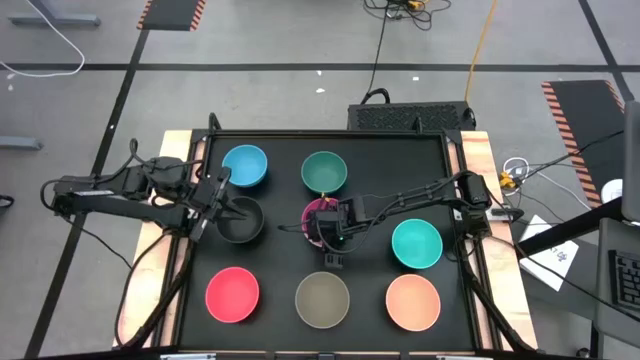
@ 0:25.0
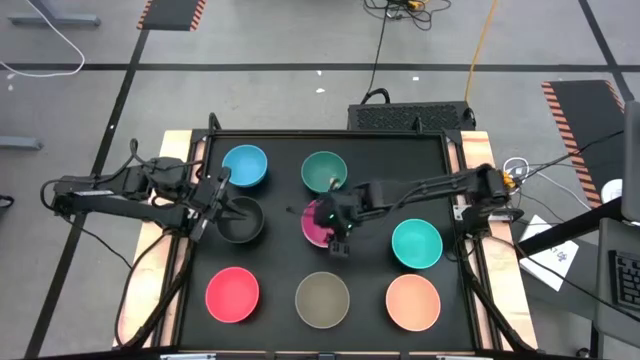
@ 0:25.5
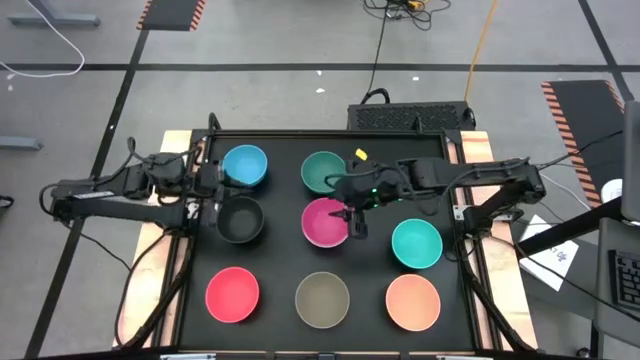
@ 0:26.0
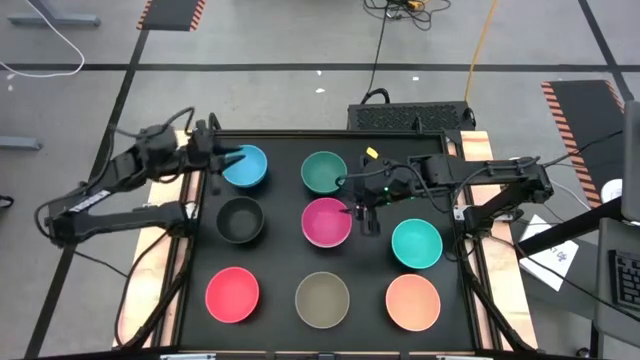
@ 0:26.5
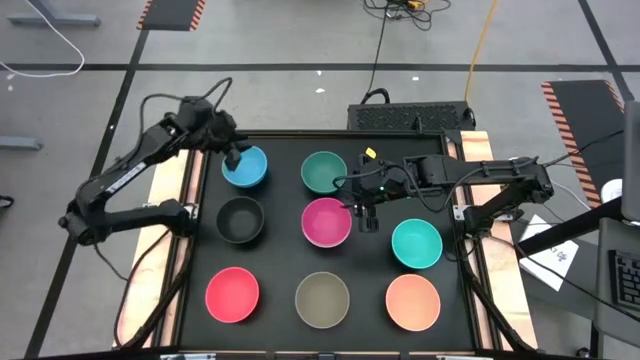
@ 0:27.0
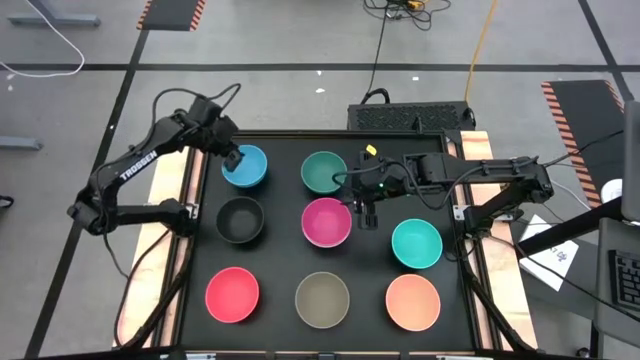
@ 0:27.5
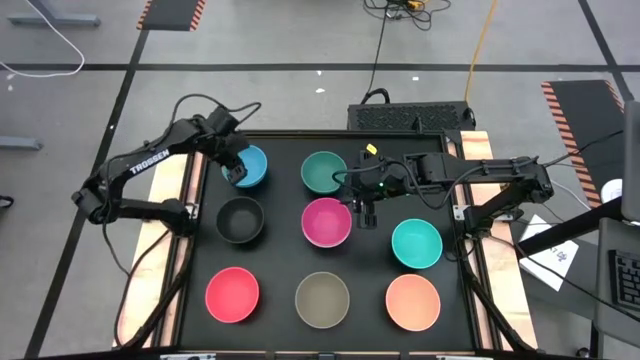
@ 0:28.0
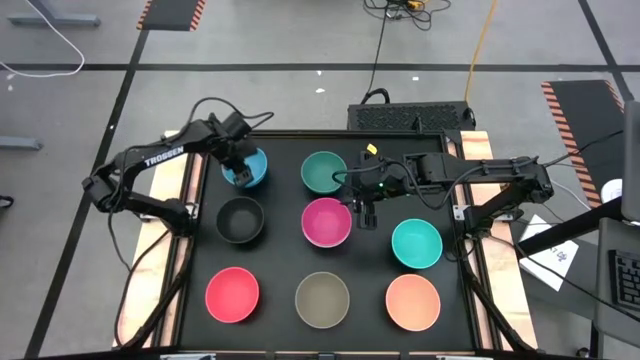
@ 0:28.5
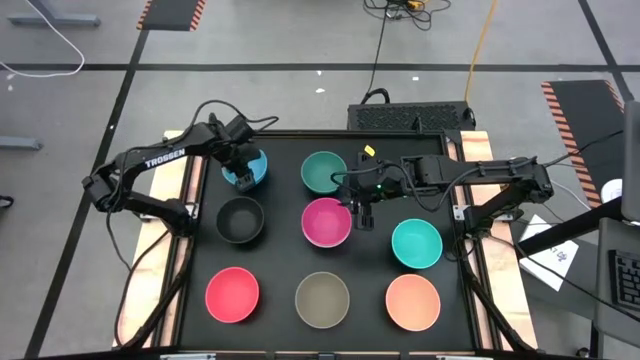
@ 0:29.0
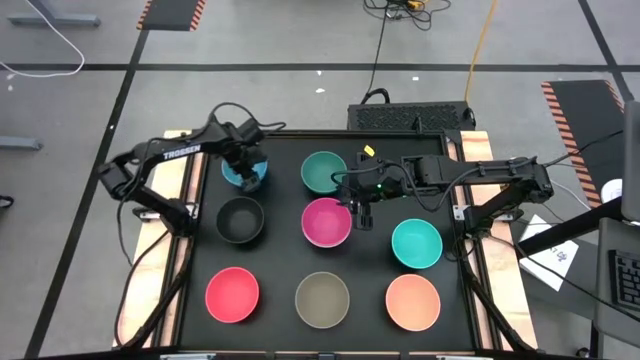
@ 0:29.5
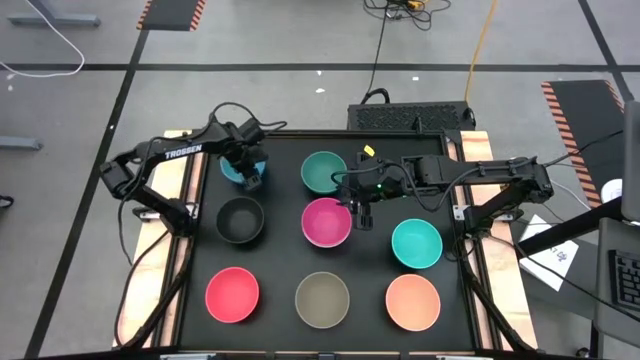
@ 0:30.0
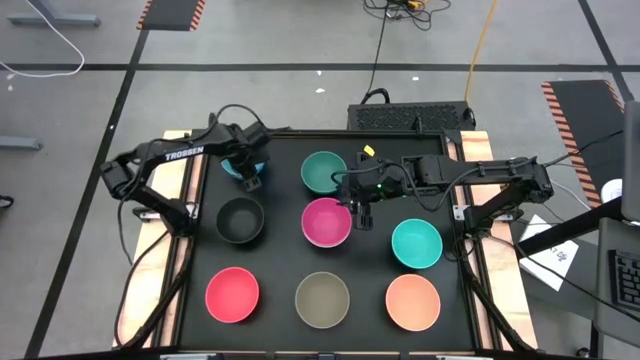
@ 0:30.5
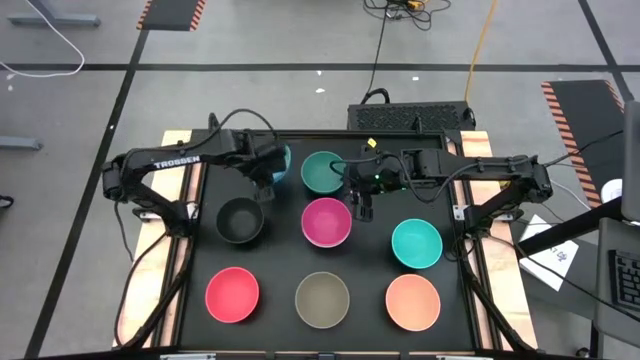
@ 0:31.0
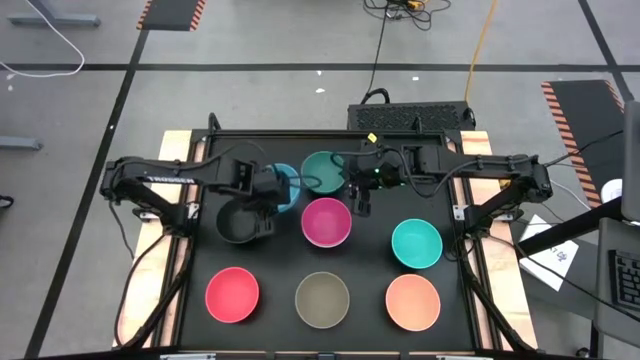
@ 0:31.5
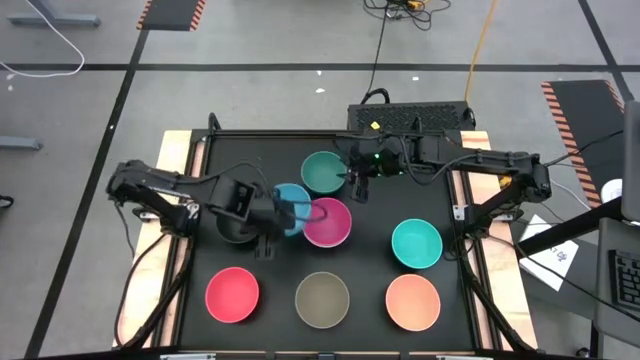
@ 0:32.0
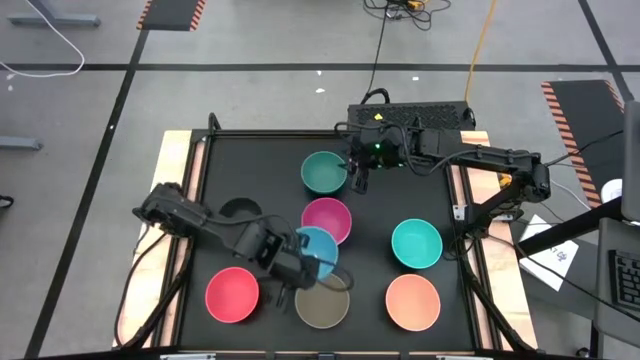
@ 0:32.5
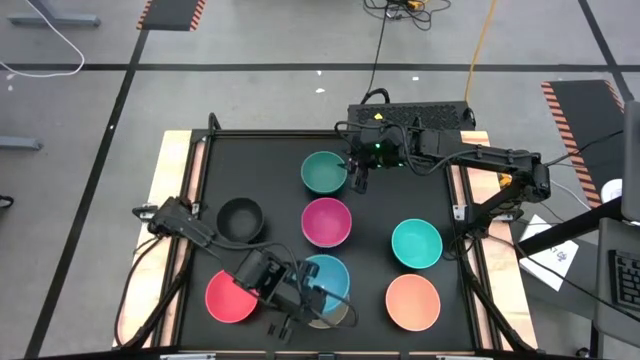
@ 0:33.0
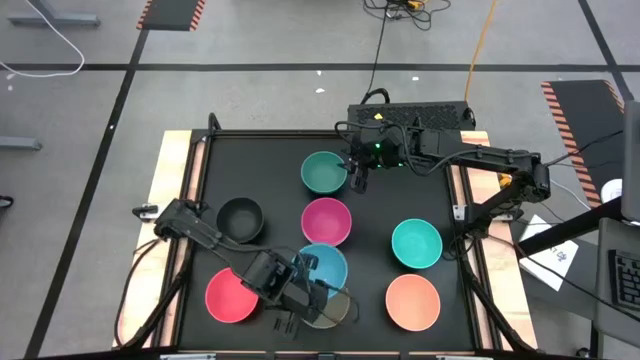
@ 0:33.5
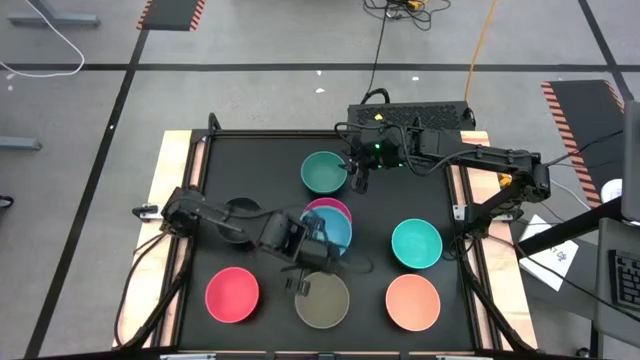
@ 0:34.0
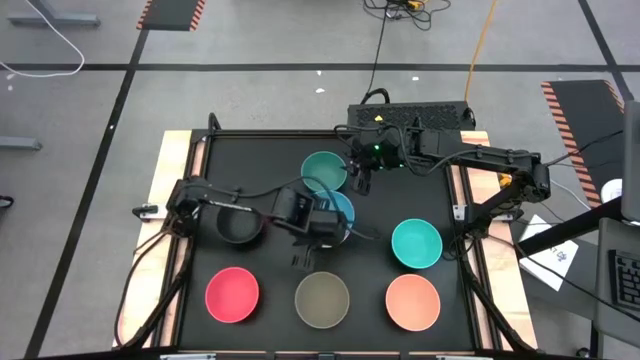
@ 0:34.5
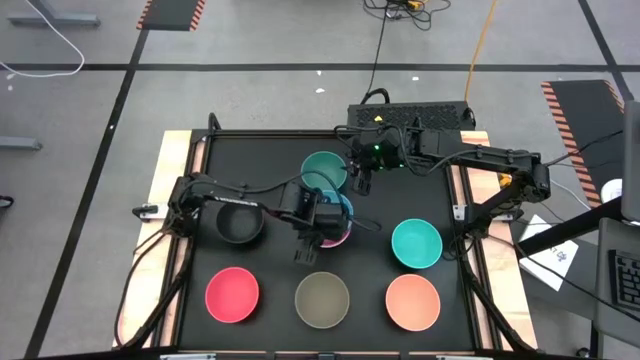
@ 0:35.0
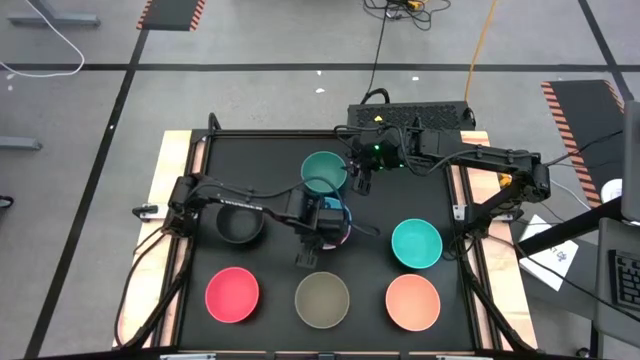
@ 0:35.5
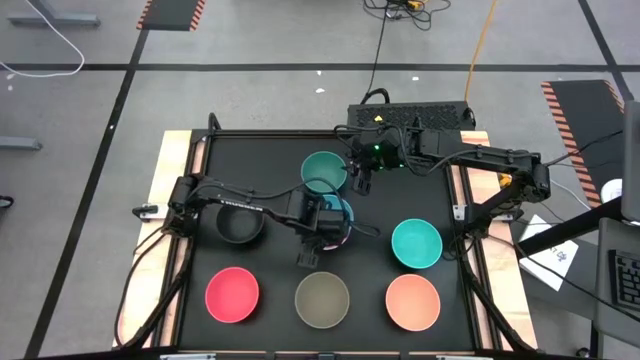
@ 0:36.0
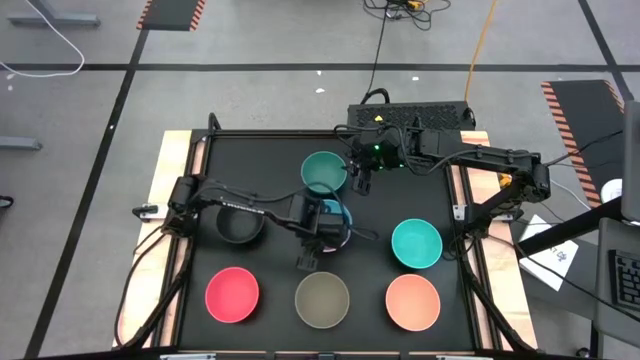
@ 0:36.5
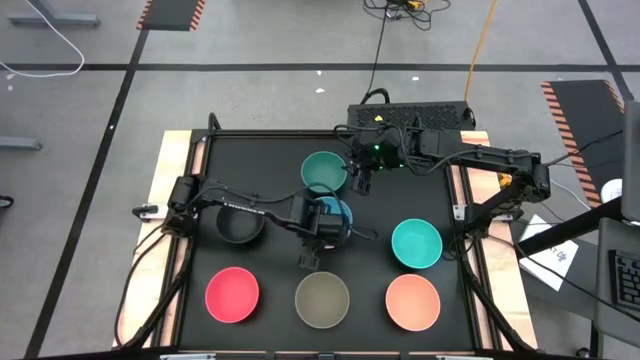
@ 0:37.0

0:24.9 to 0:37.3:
Task: Nest bowls inside each other
Stack the light blue bowl on top of the pink bowl

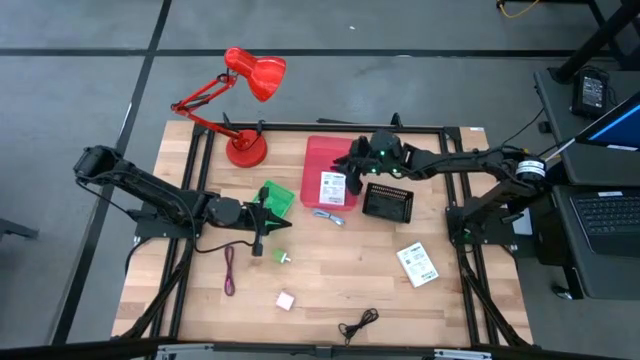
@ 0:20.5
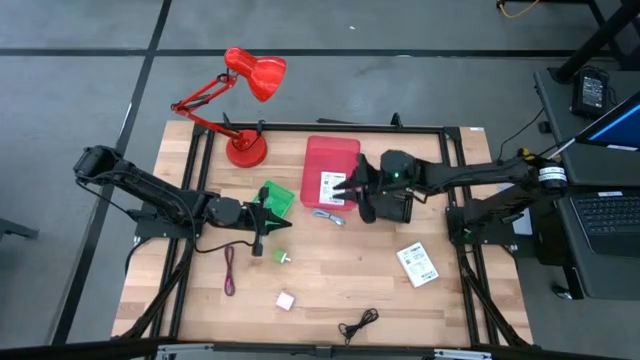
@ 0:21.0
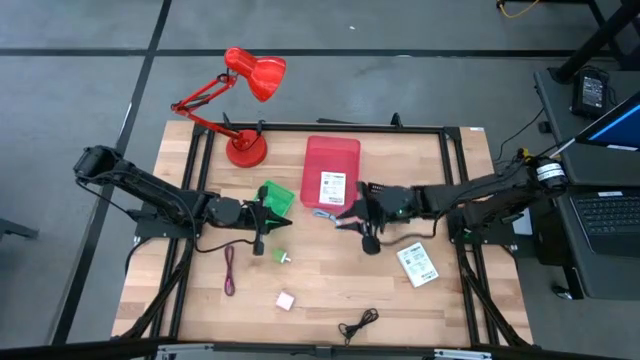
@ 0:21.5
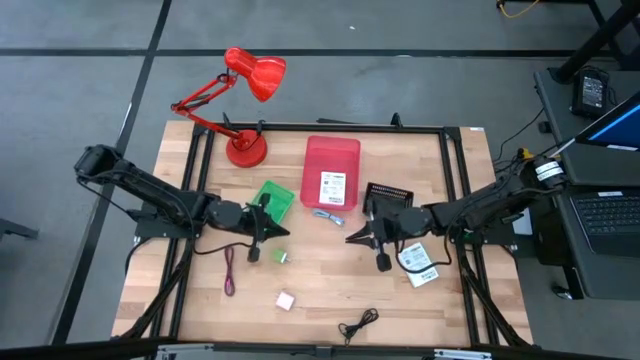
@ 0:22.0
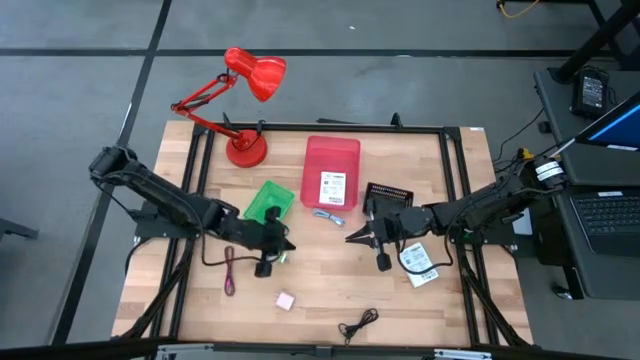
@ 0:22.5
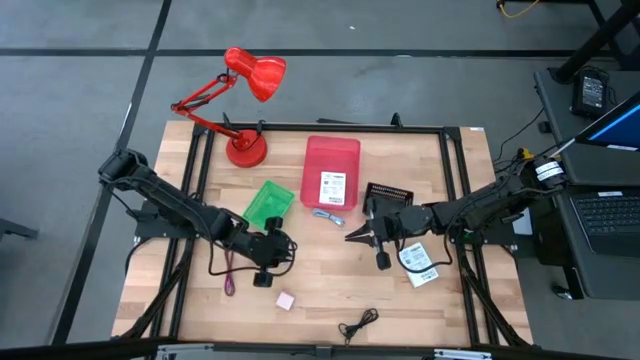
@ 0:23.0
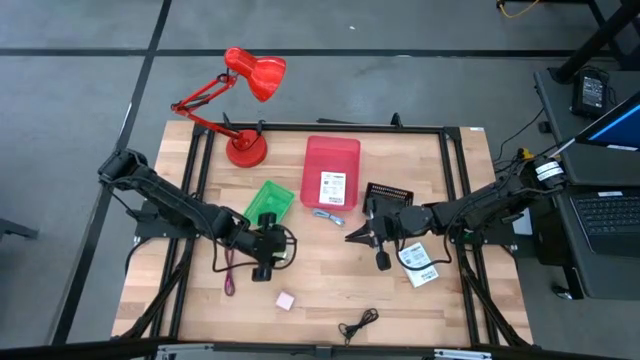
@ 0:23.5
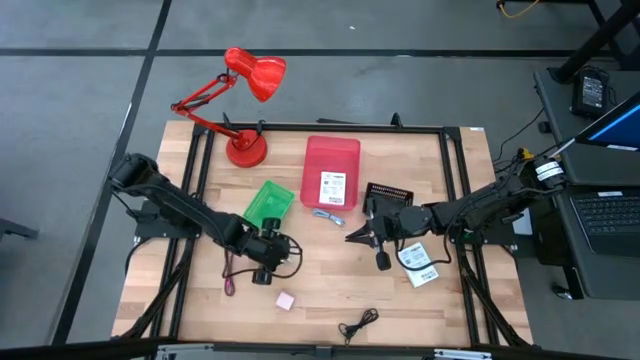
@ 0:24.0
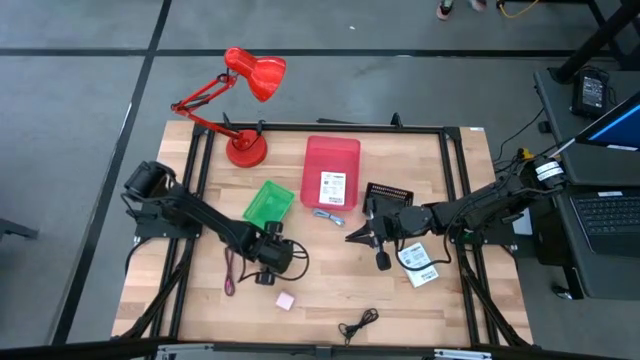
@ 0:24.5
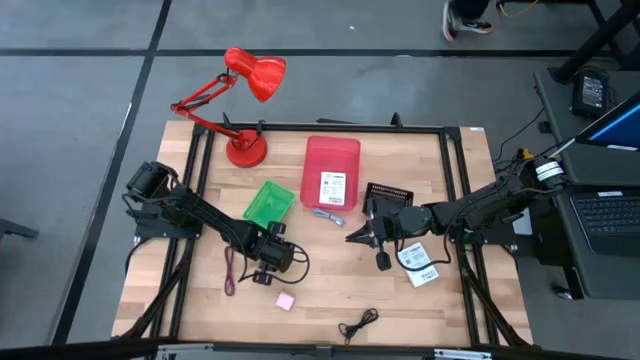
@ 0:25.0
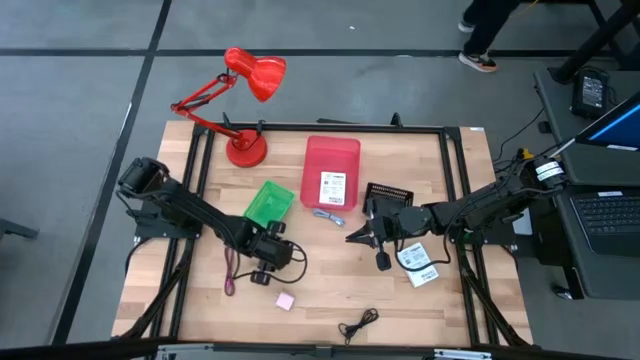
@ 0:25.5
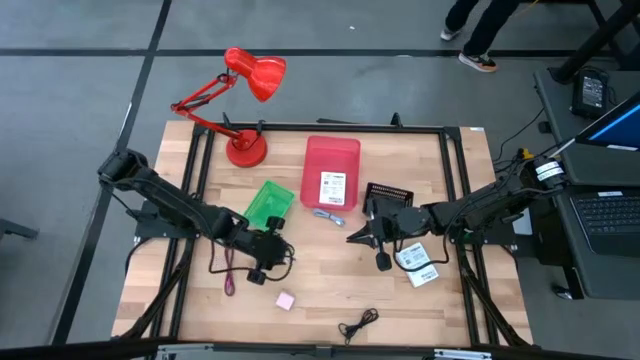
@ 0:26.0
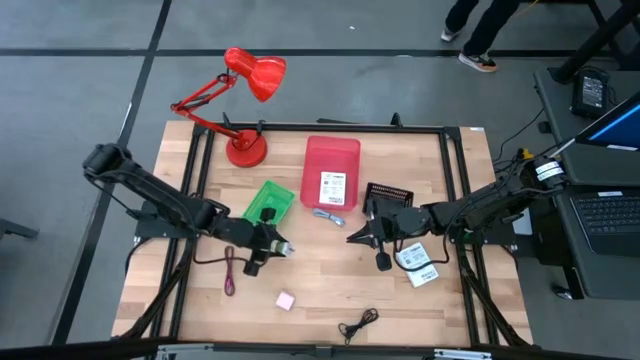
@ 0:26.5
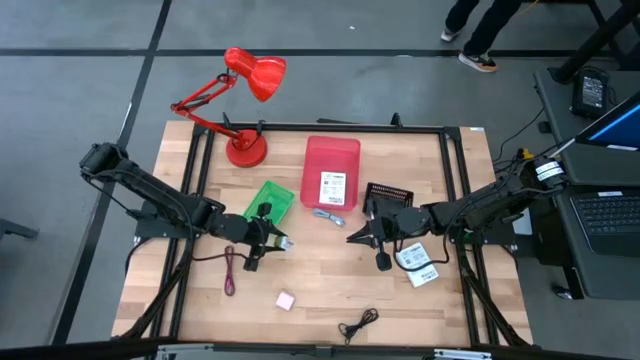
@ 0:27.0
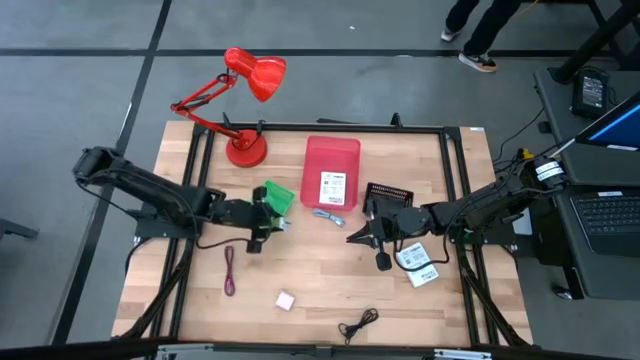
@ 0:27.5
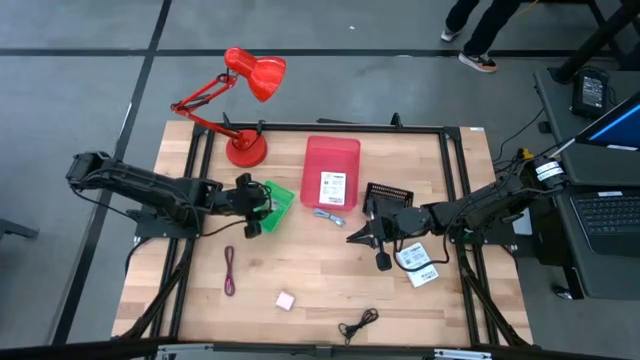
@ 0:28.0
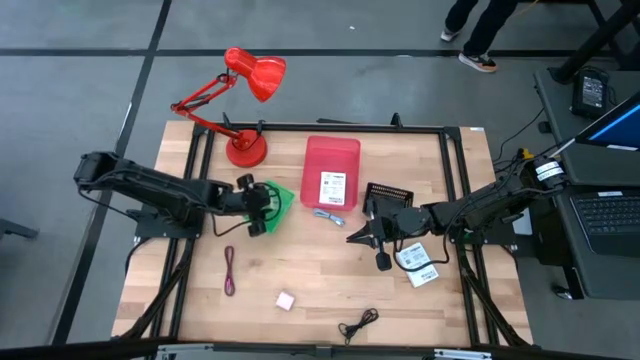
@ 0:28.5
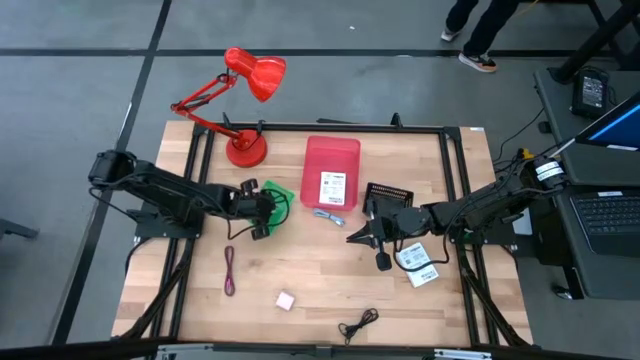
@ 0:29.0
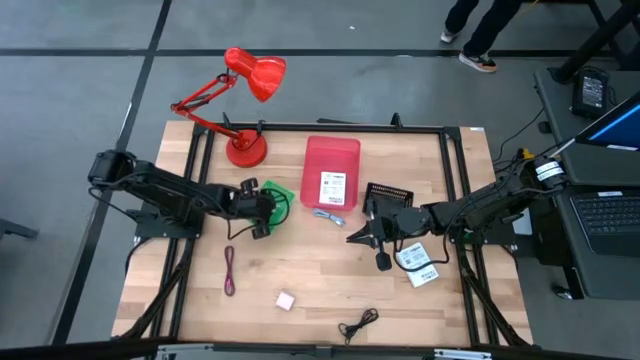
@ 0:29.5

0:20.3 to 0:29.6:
Task: Pick and place items into bin
Put the green charger adapter into the green bin
